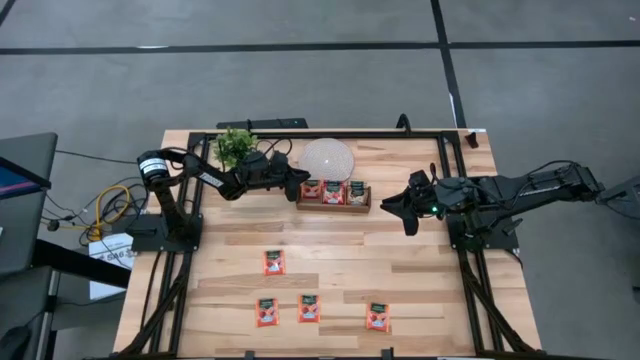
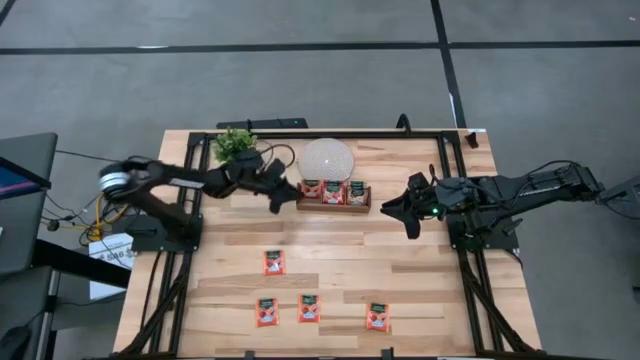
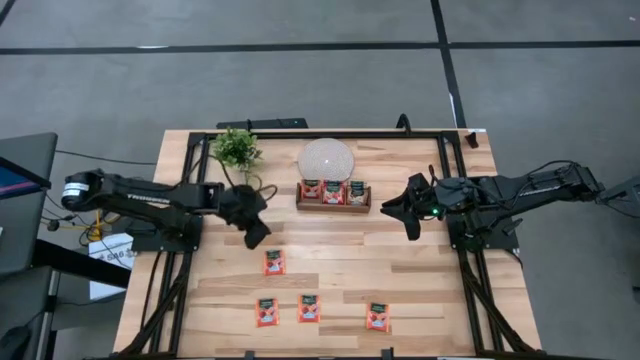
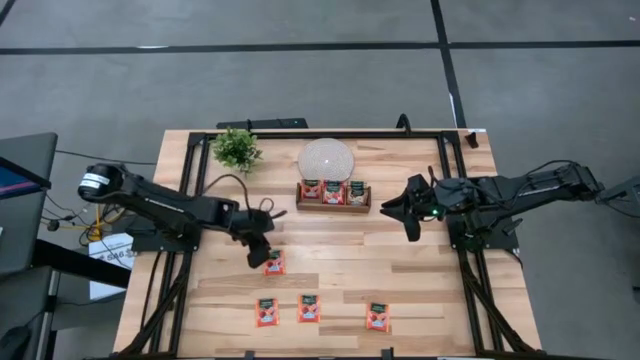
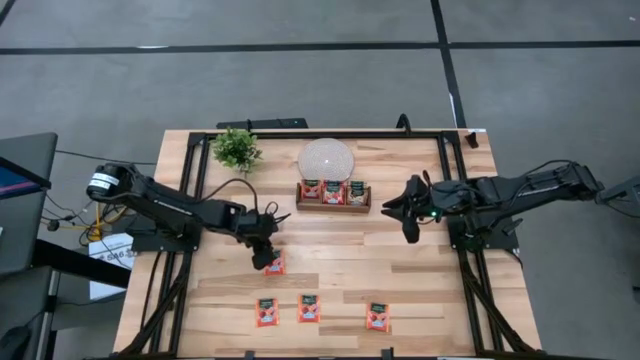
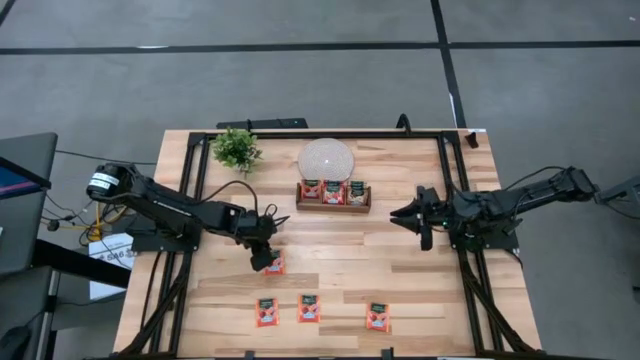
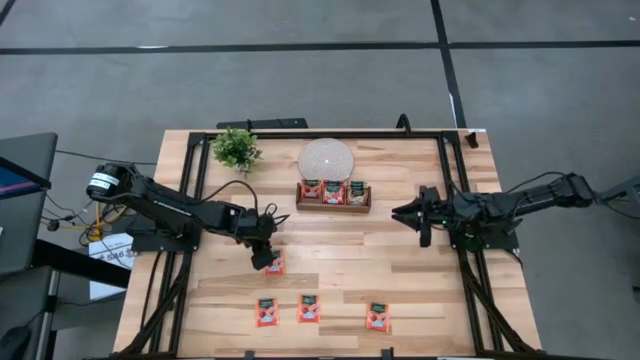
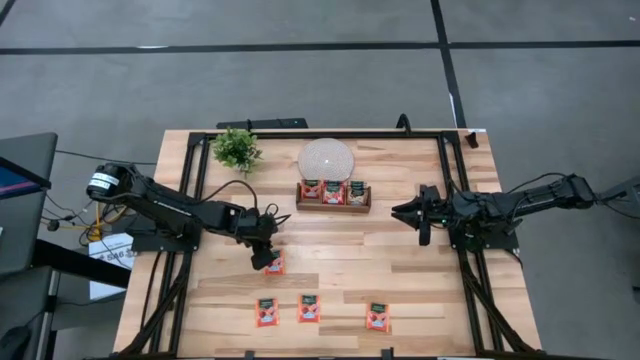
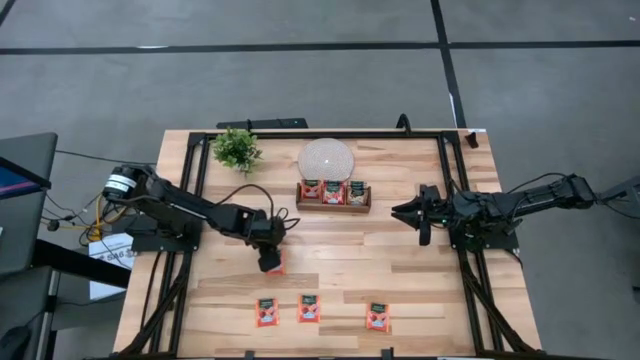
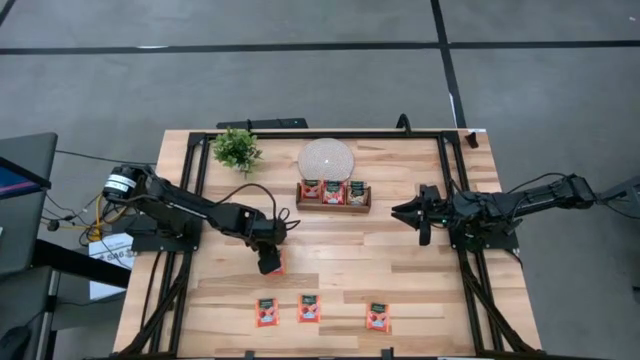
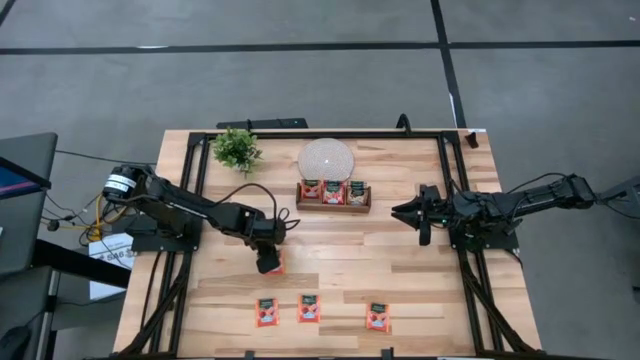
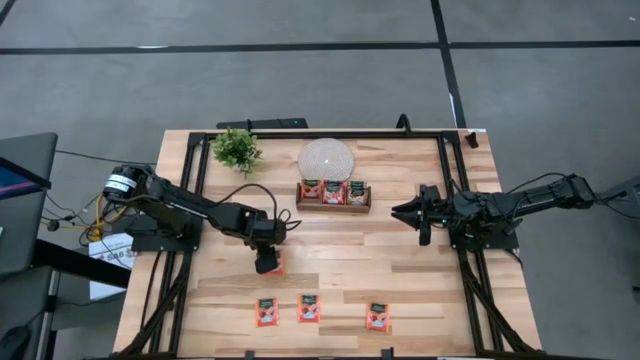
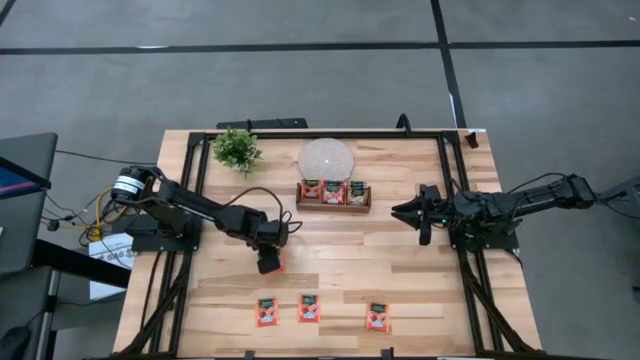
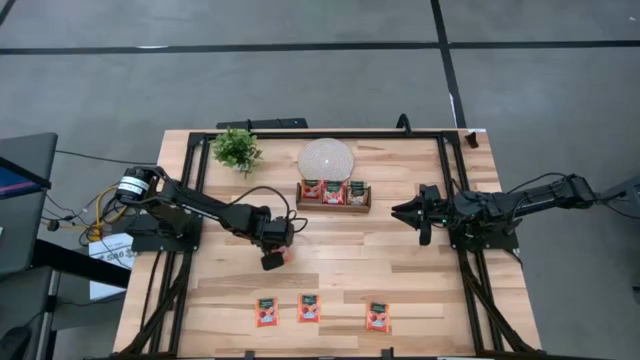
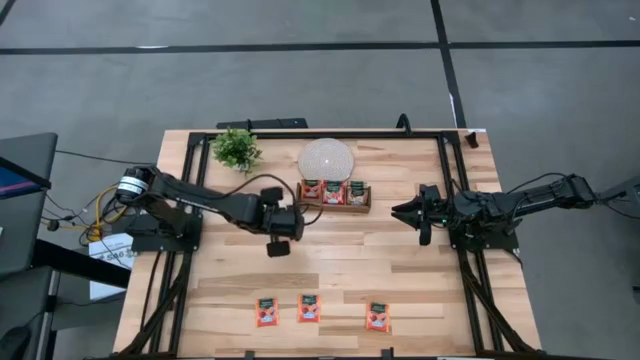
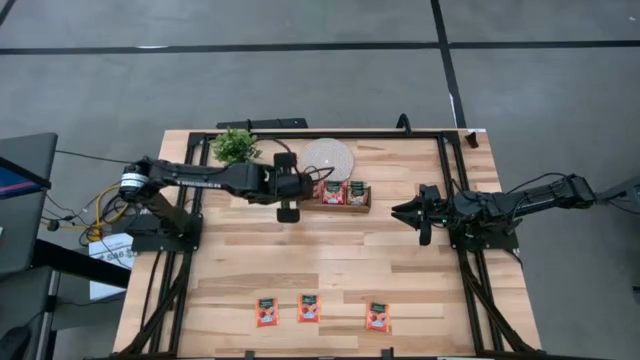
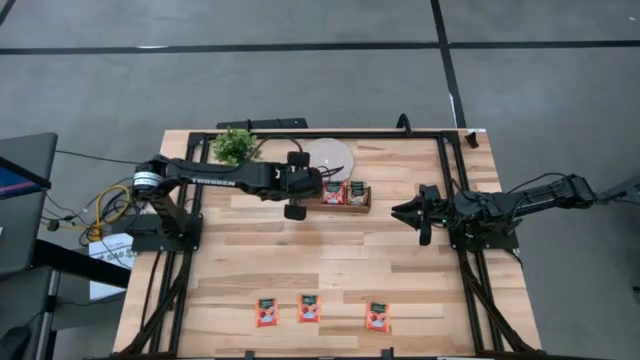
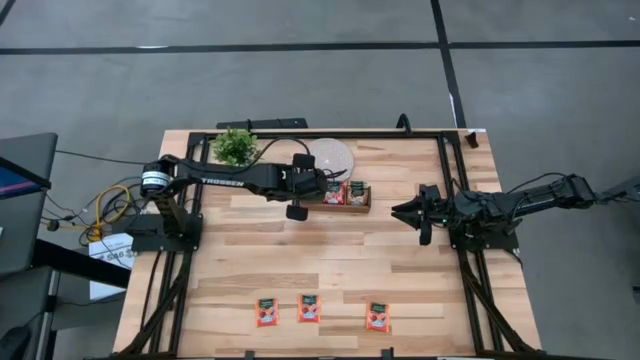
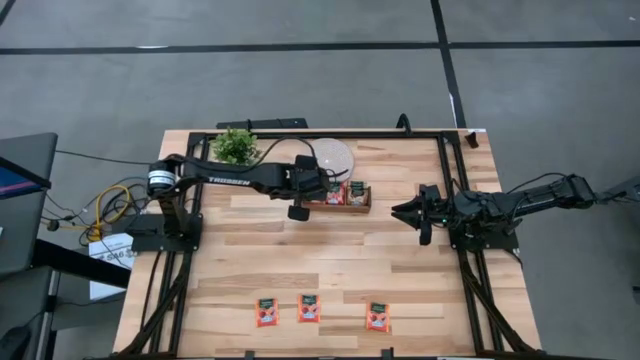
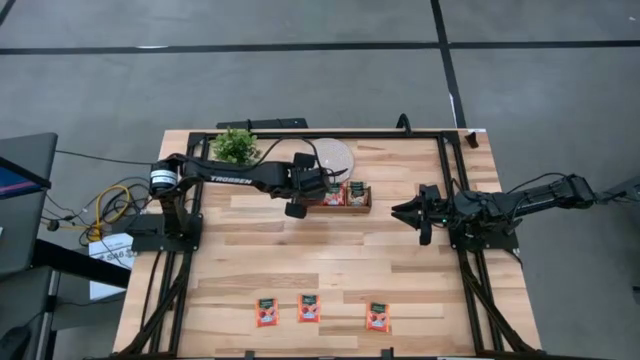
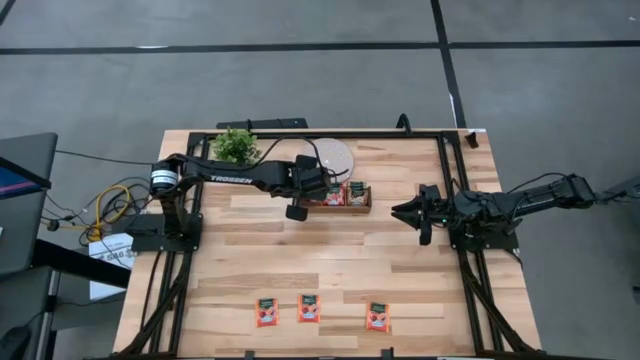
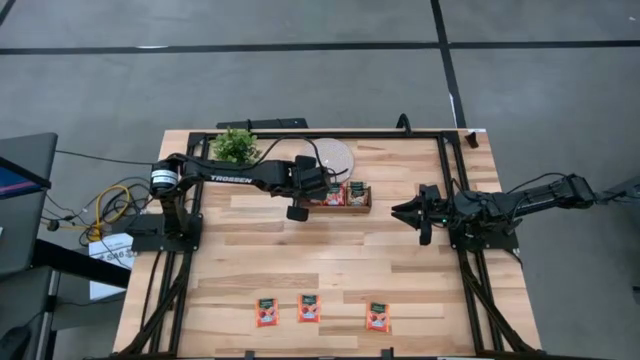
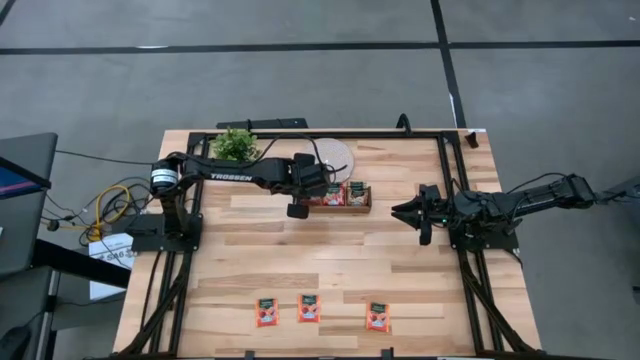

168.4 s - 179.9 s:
Task: Pick & Place Tea
Put the orange tea bag into the left section of the wooden organizer

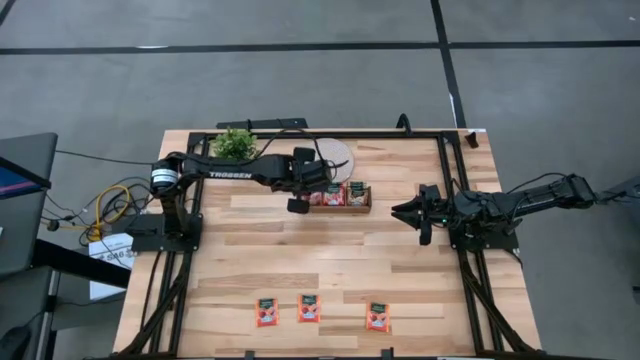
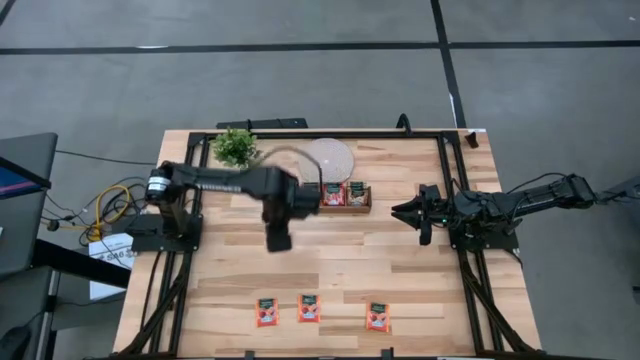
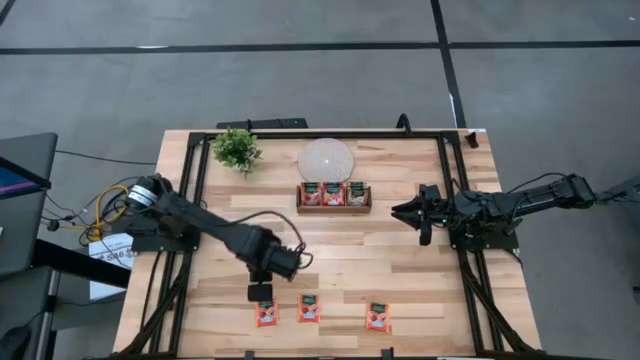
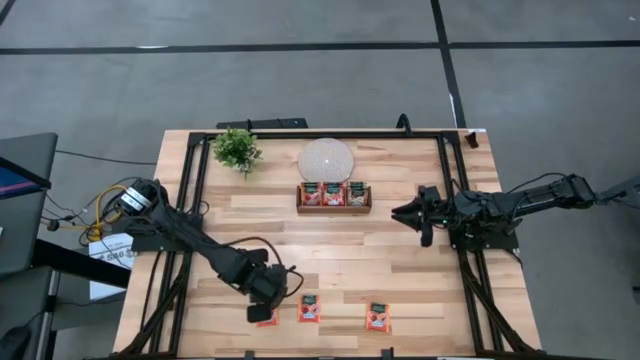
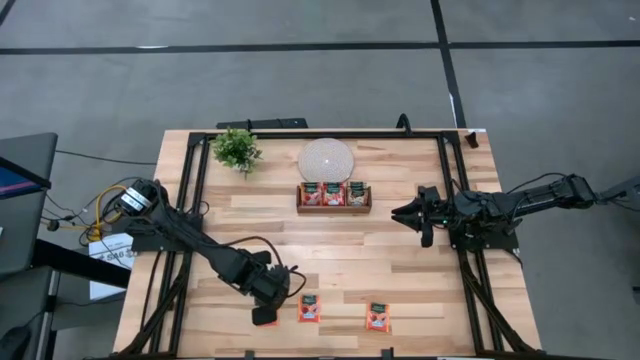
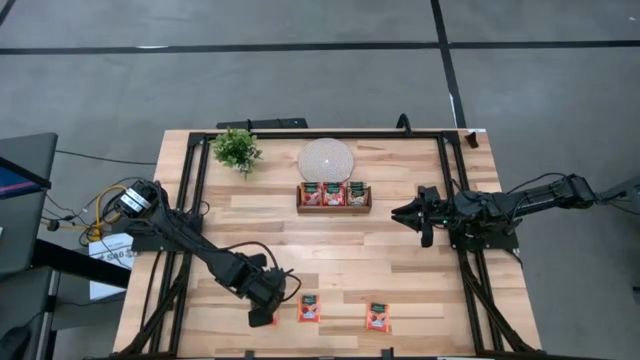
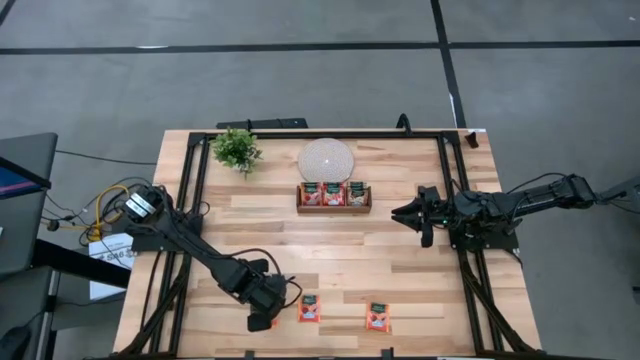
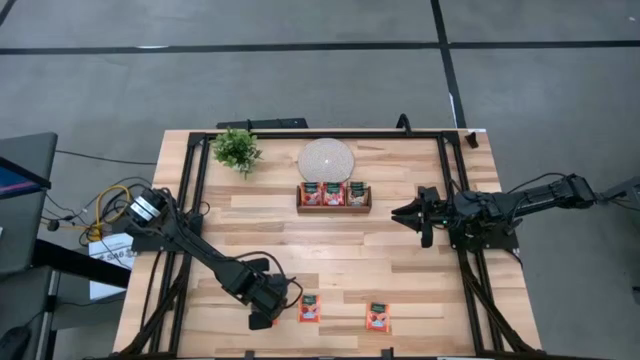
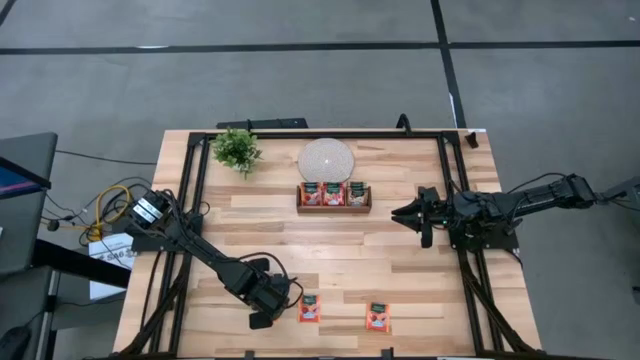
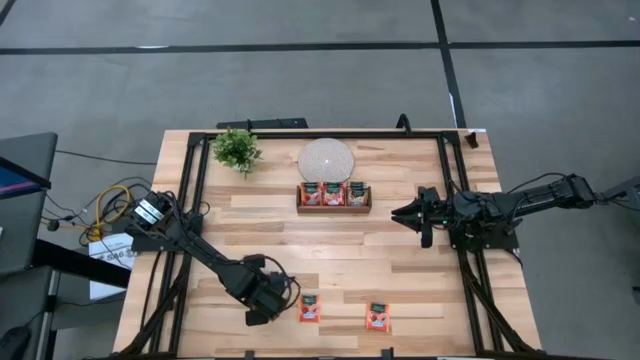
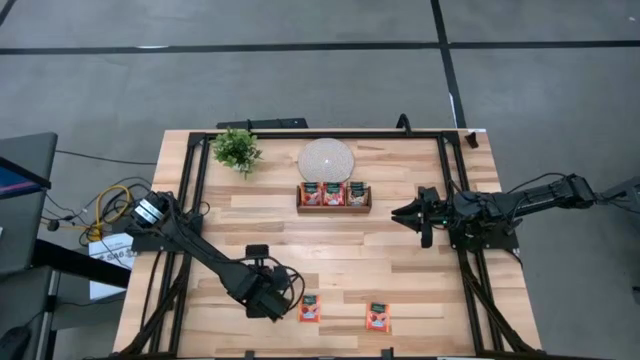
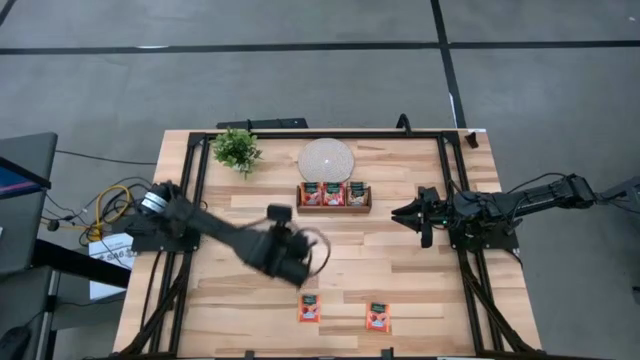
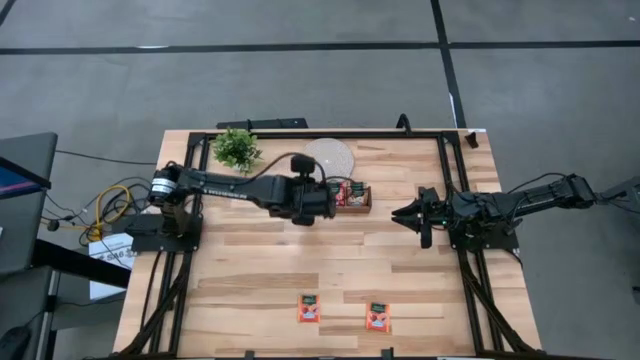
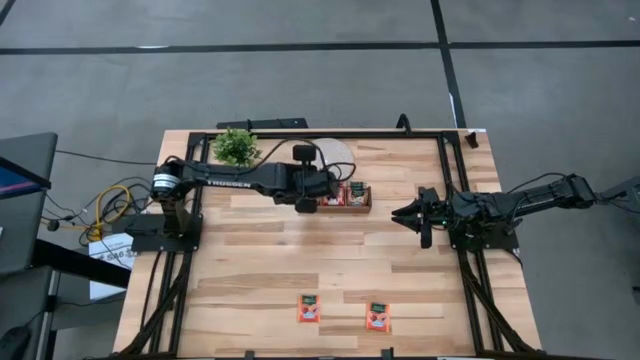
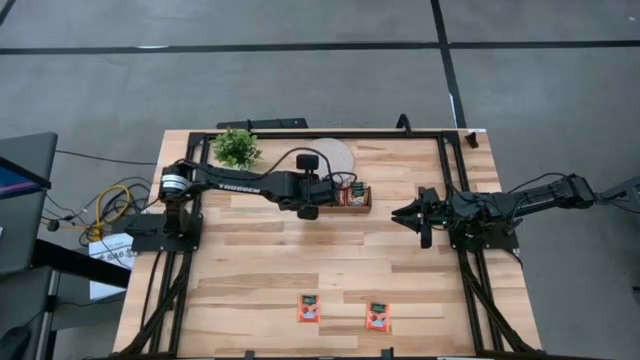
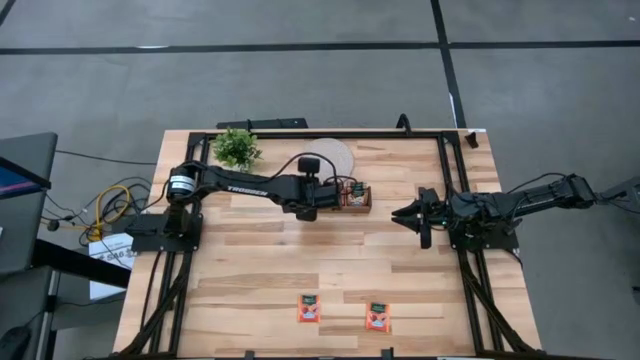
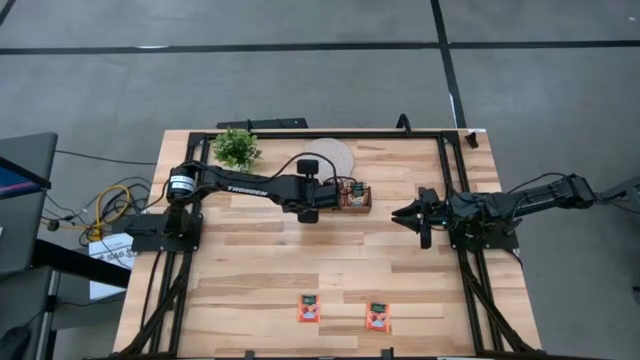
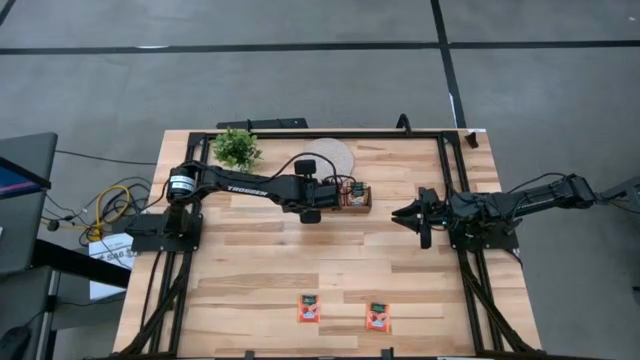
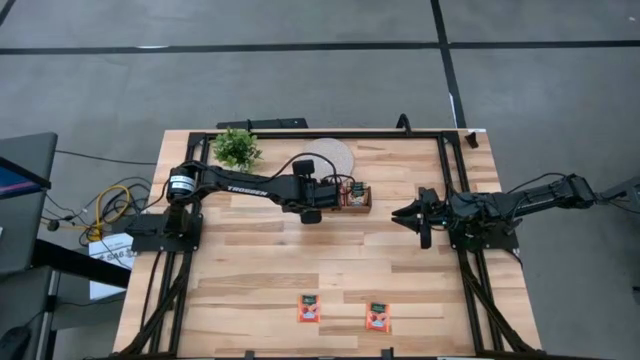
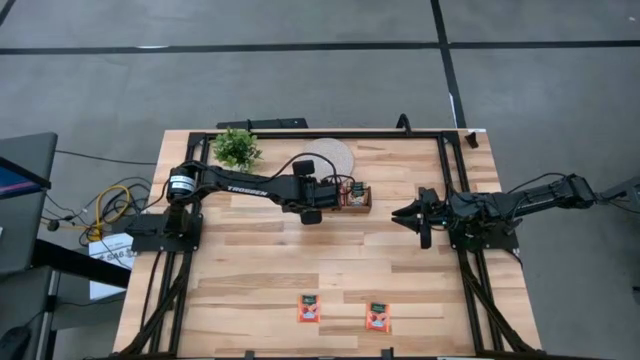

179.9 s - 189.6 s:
Put the orange tea bag into the left section of the wooden organizer
